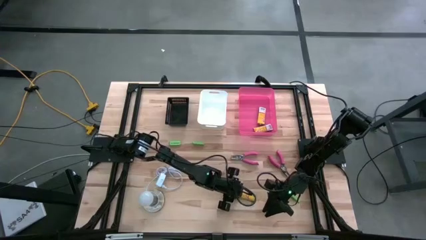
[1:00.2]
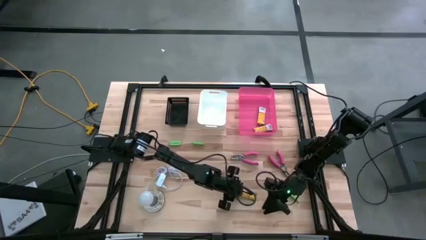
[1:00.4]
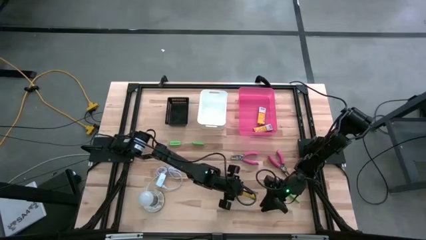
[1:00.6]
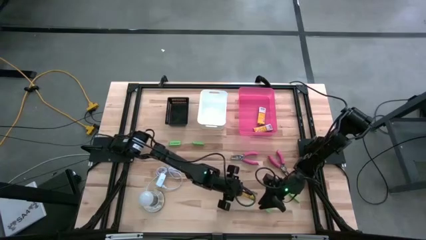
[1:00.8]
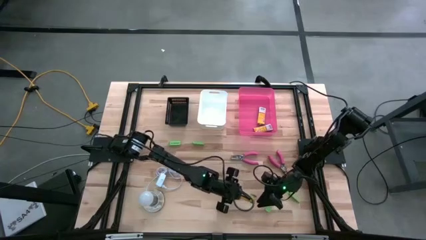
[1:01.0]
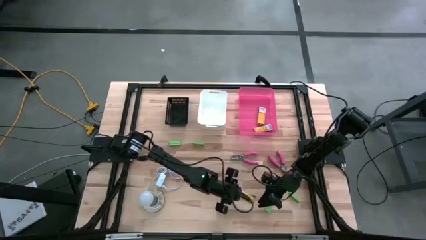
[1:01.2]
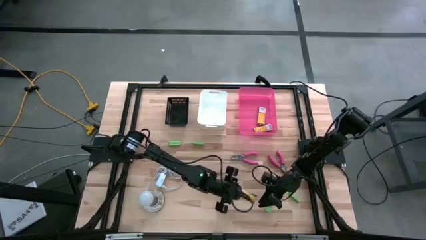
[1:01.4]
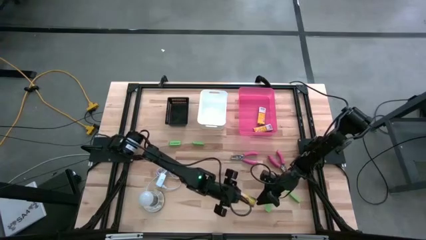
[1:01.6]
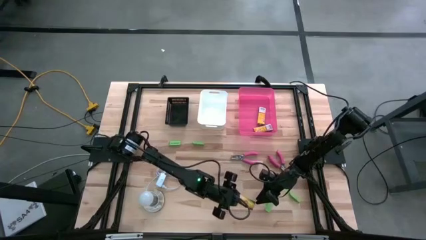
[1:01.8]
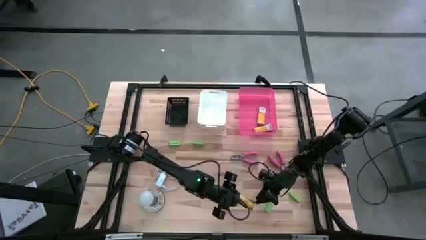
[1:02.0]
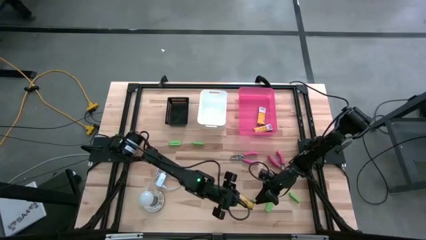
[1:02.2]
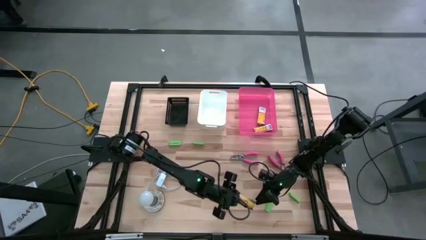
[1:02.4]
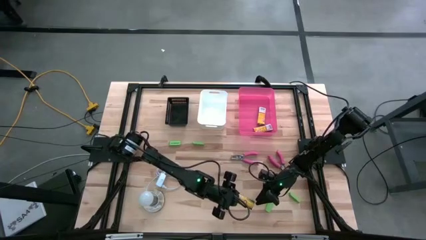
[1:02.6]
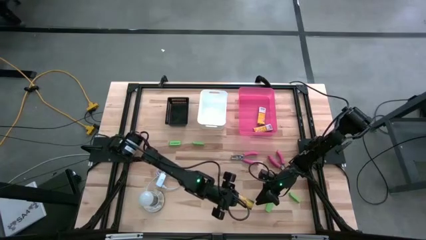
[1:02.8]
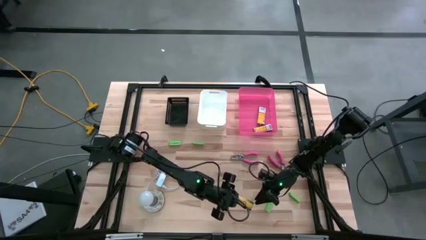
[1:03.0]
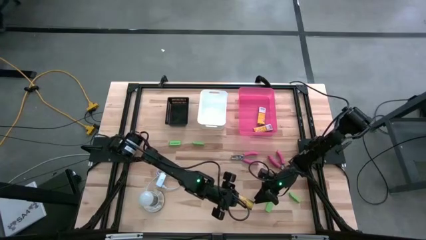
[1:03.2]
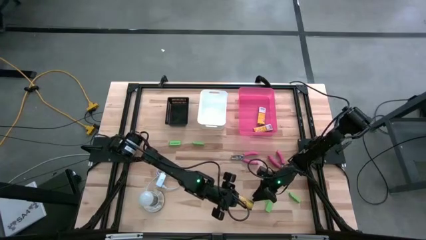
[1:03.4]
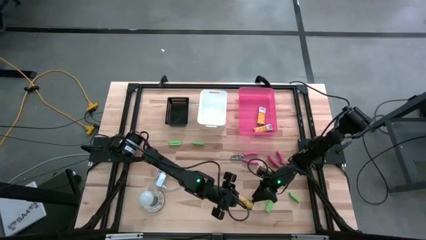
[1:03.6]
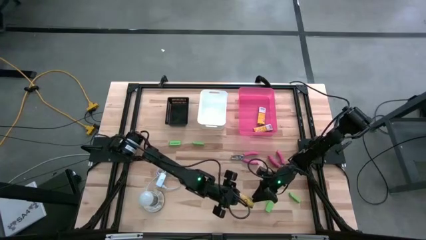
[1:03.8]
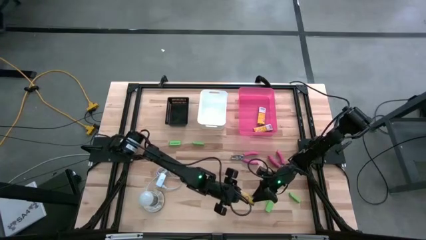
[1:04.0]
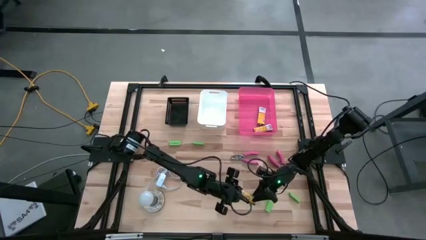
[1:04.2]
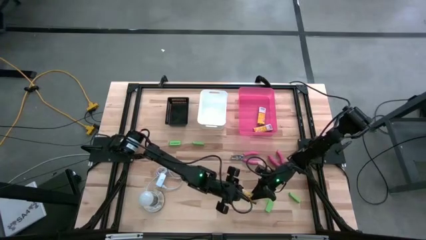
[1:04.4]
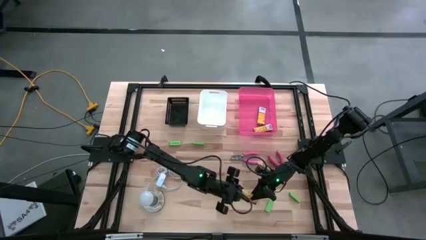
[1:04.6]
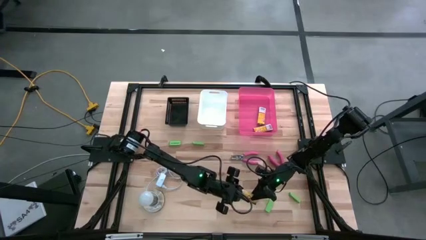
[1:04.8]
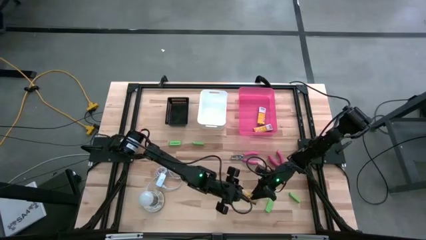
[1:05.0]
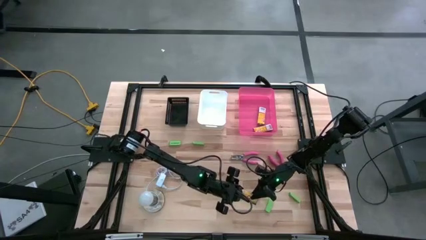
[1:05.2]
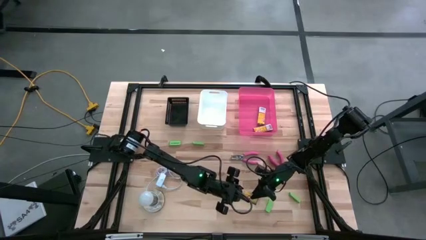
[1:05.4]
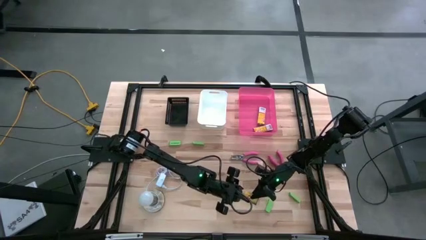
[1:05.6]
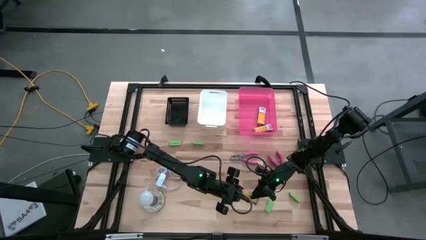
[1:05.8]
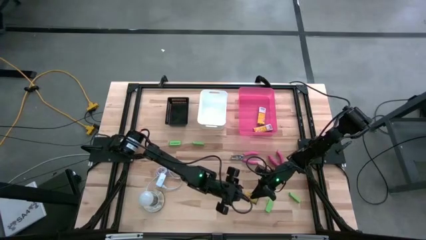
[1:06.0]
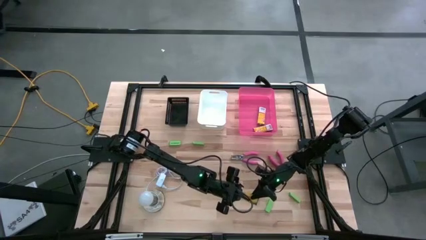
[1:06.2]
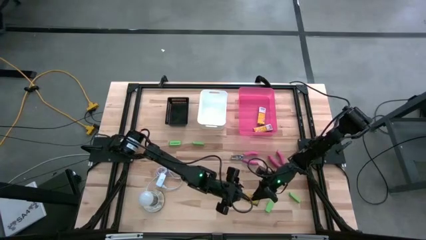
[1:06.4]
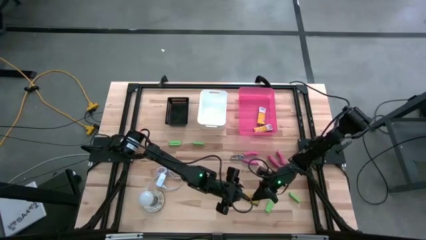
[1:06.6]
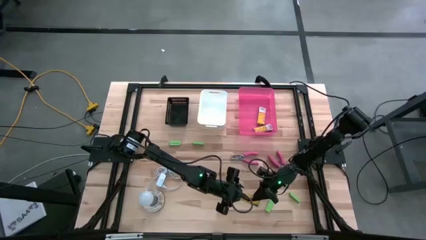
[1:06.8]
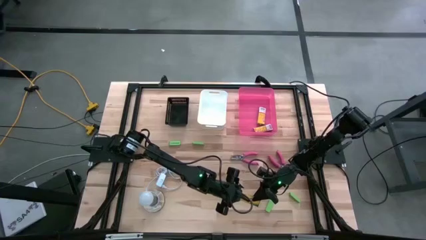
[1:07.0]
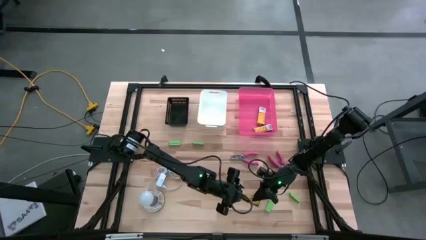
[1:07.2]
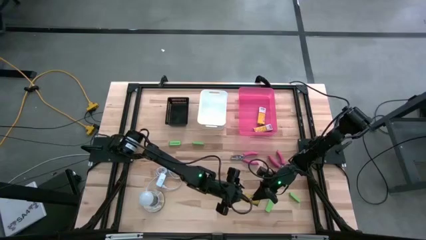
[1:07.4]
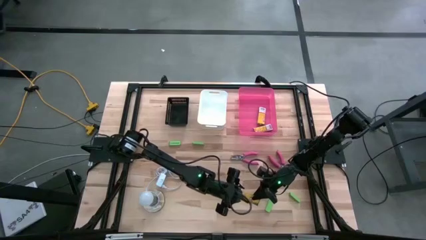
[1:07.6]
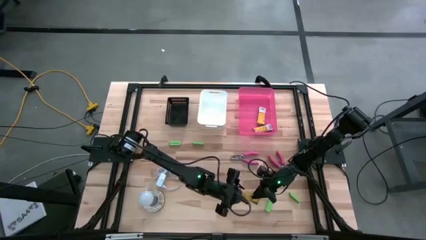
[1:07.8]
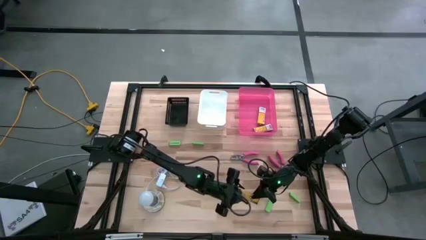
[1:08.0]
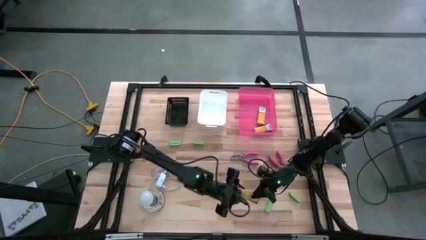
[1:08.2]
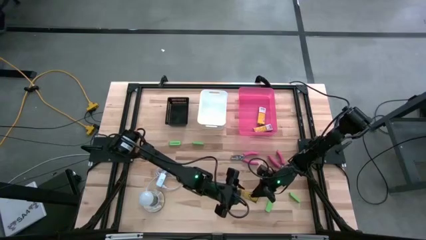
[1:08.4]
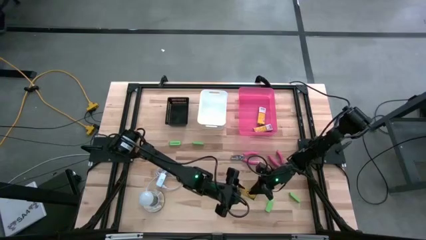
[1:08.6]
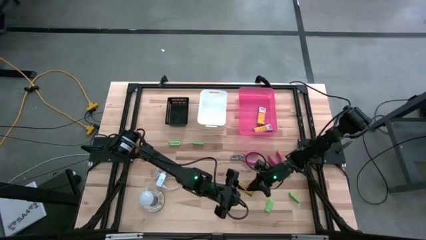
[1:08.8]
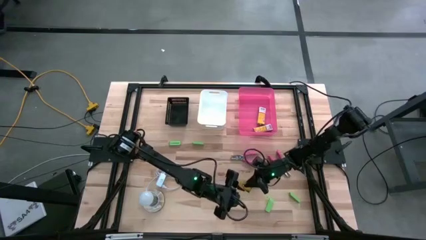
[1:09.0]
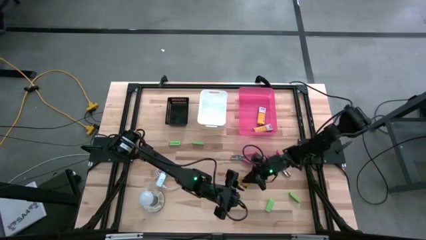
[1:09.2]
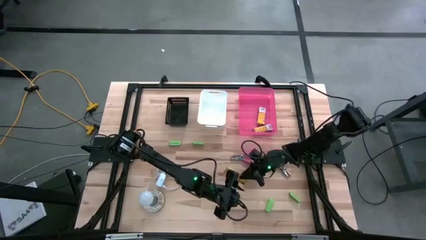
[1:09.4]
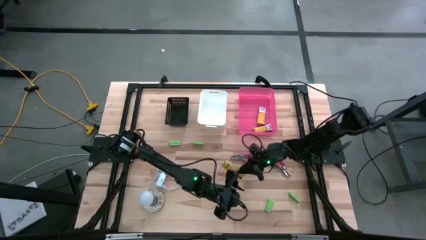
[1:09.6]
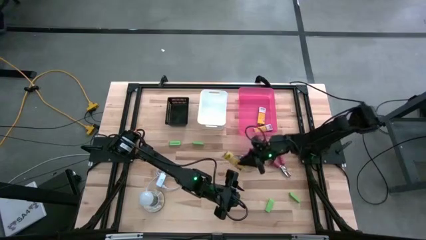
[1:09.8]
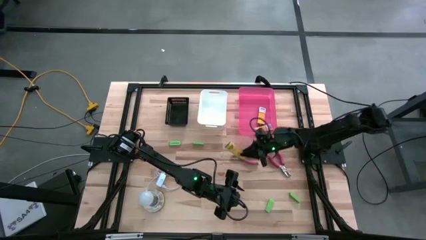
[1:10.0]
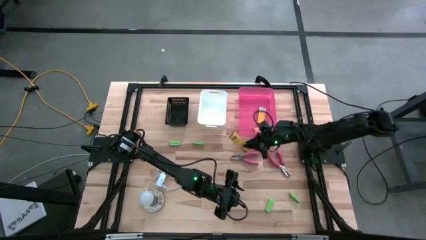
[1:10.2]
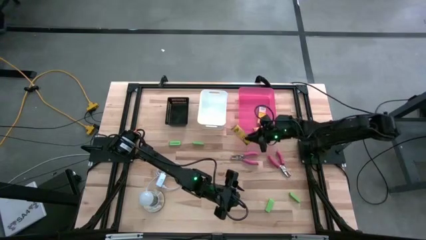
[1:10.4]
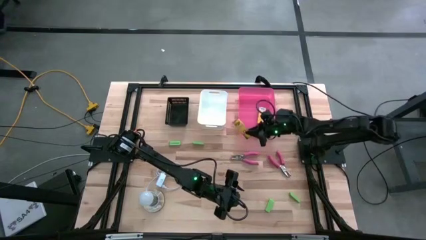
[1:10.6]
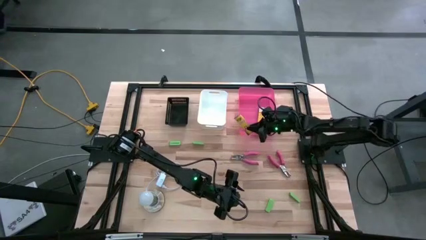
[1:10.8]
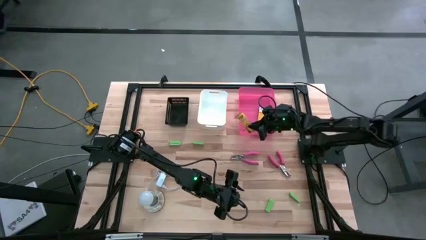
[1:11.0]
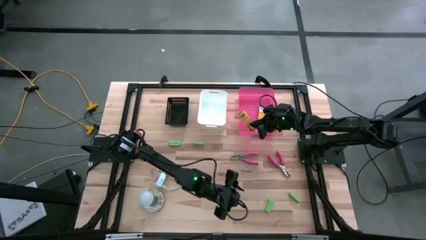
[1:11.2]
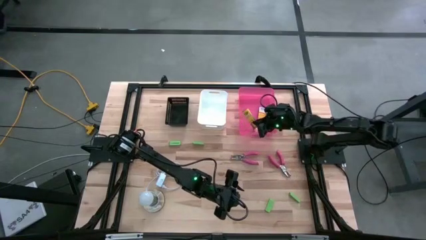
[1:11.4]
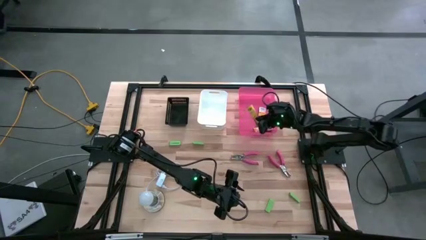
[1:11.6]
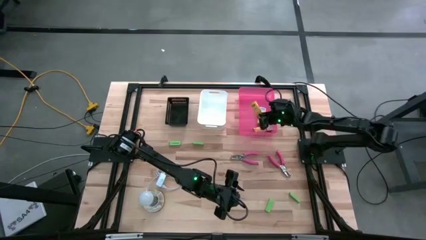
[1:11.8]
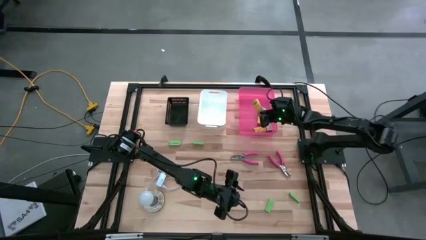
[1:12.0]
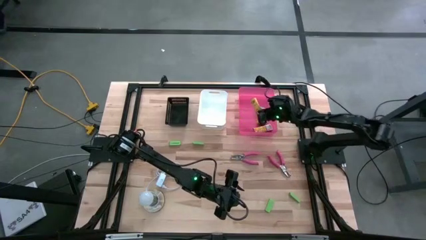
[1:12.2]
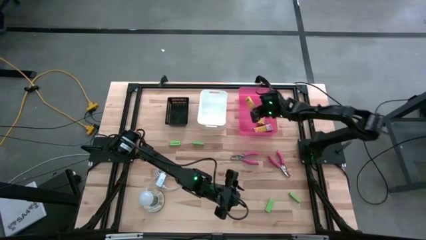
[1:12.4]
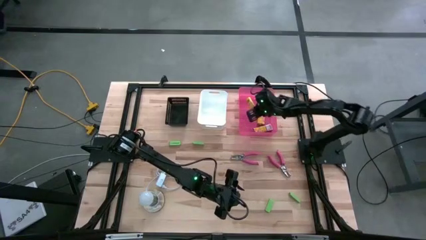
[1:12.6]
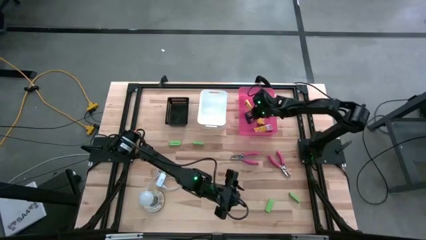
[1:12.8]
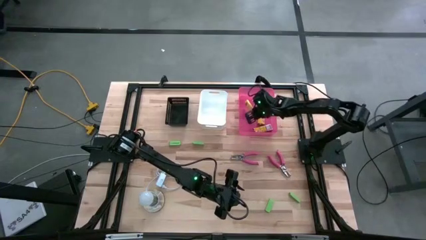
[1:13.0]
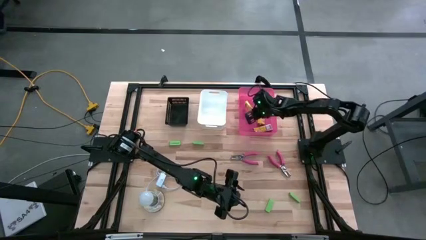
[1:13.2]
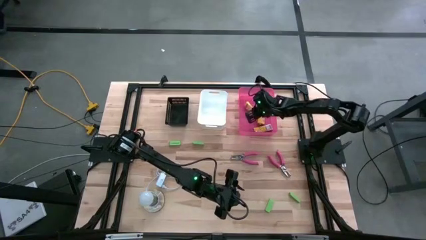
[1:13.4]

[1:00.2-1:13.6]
Task: Pick & Place School Supplies
Put the crayon box into the pink bin
